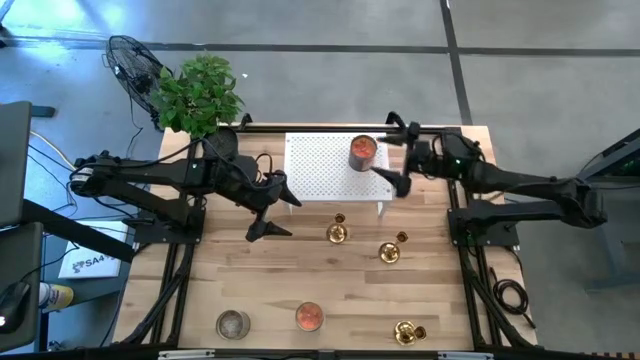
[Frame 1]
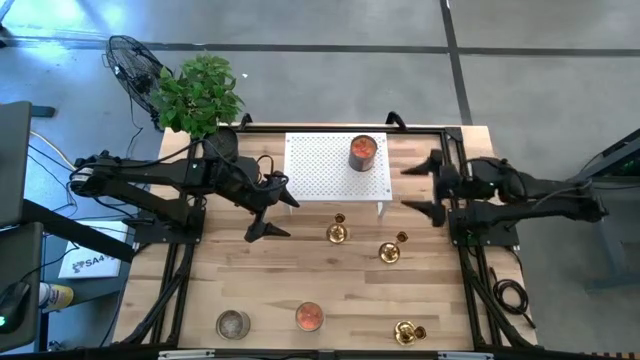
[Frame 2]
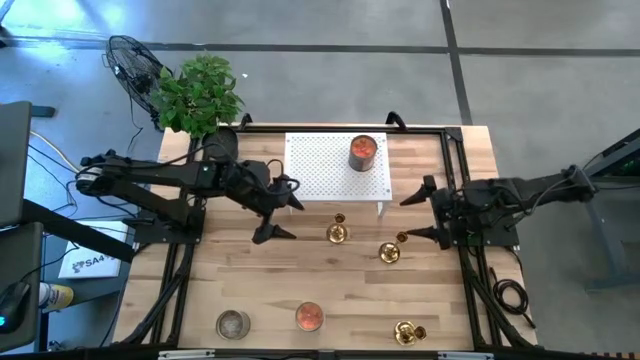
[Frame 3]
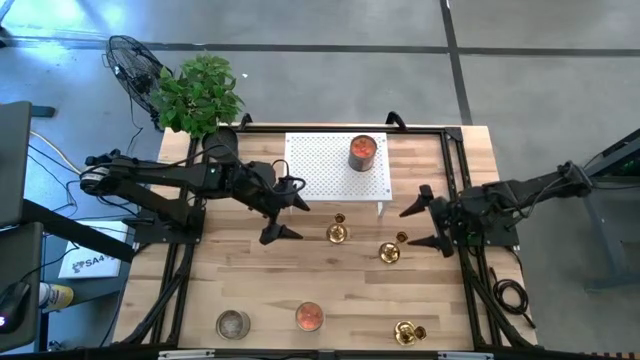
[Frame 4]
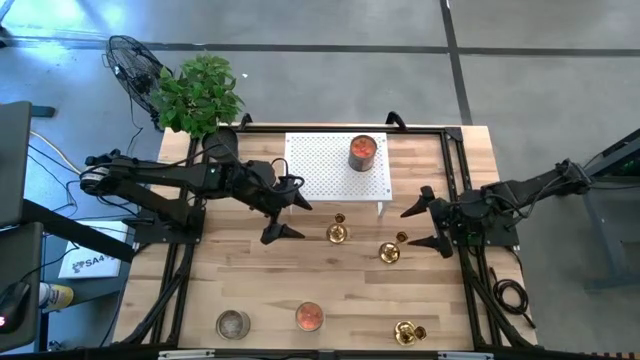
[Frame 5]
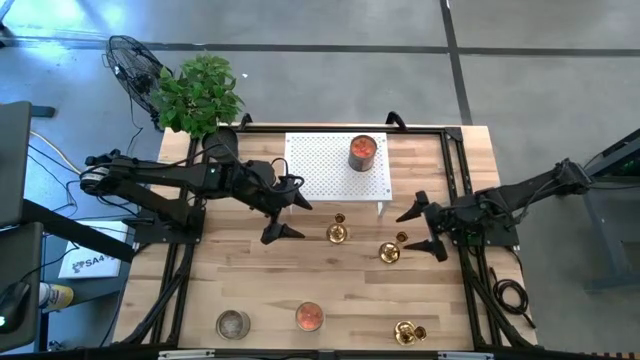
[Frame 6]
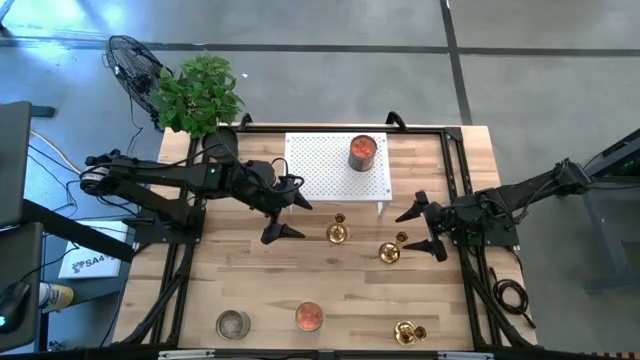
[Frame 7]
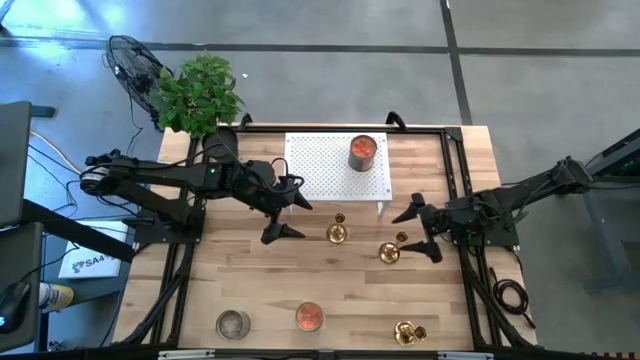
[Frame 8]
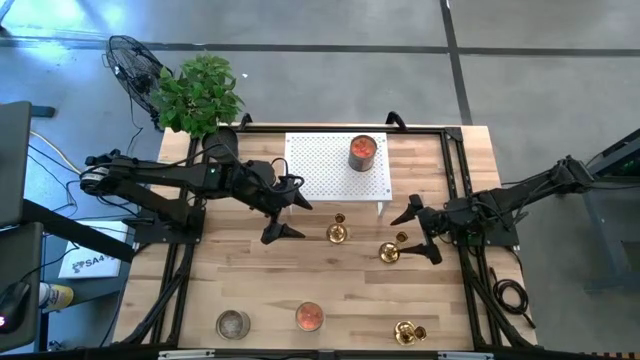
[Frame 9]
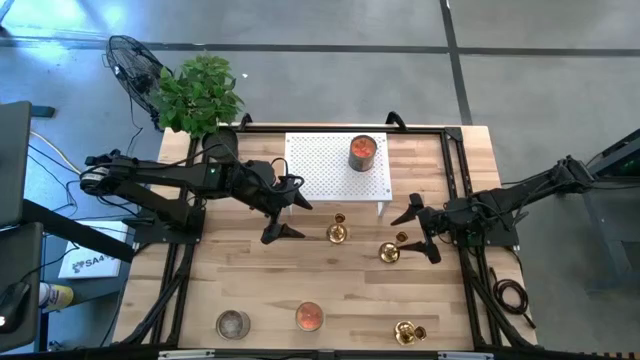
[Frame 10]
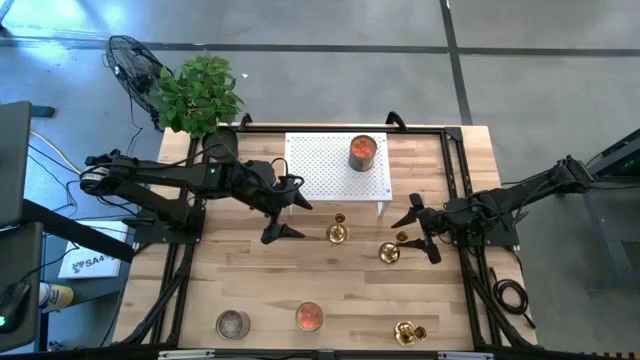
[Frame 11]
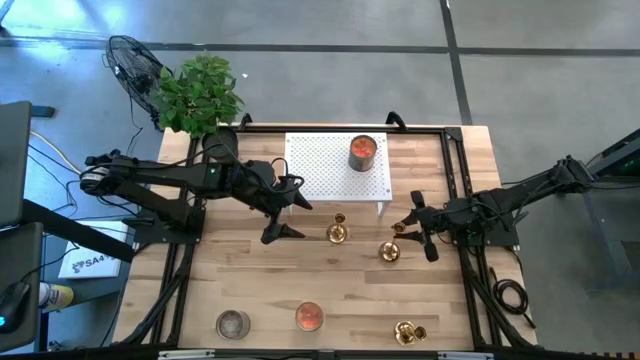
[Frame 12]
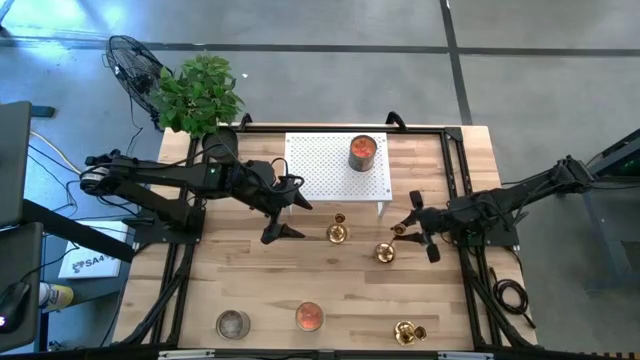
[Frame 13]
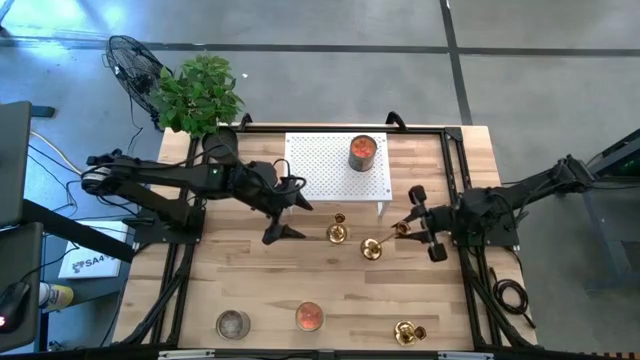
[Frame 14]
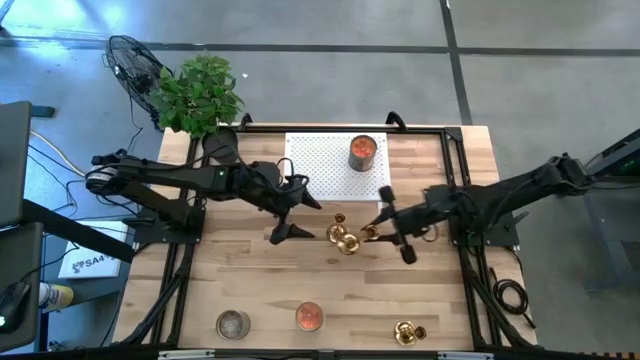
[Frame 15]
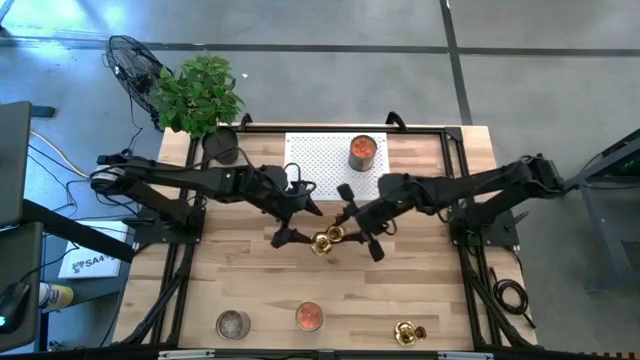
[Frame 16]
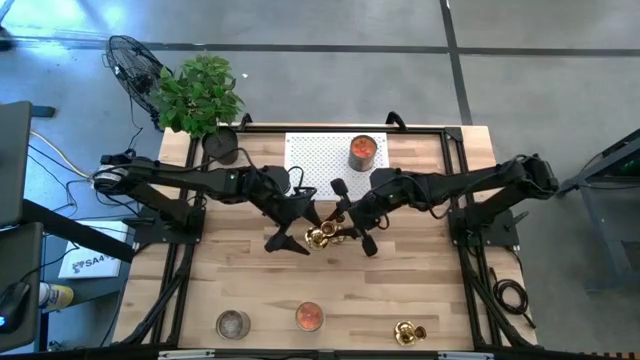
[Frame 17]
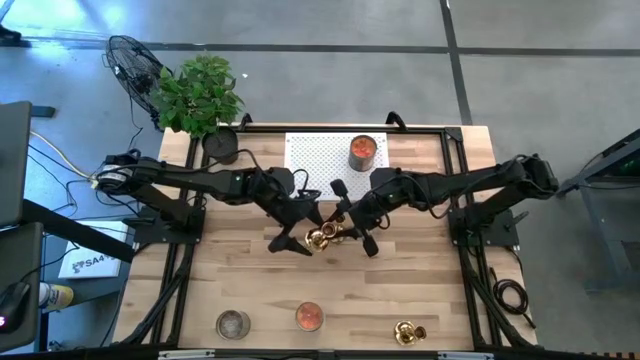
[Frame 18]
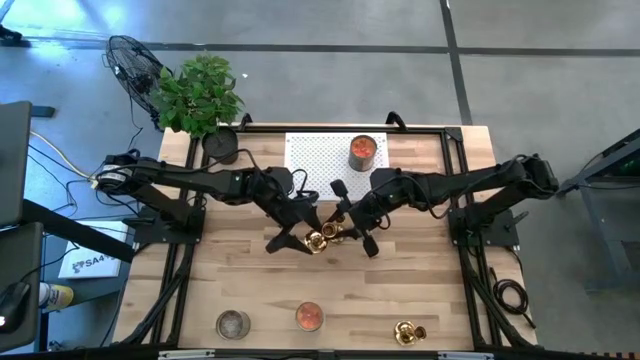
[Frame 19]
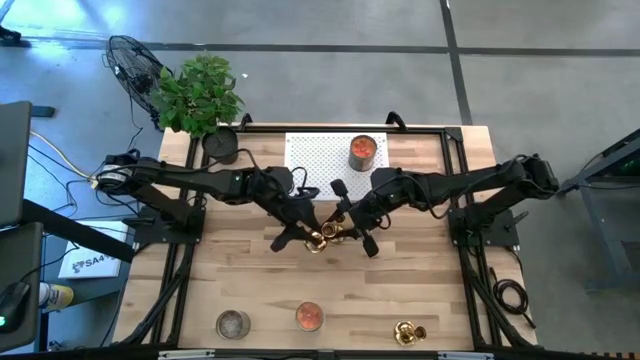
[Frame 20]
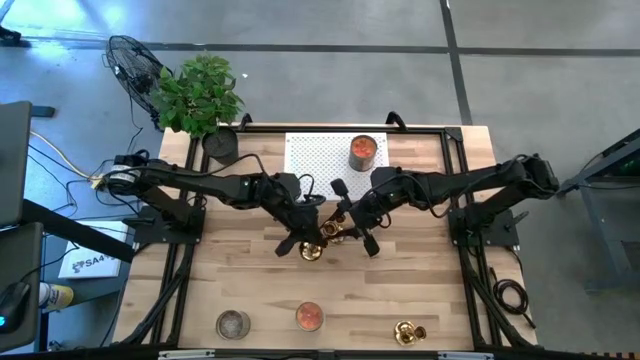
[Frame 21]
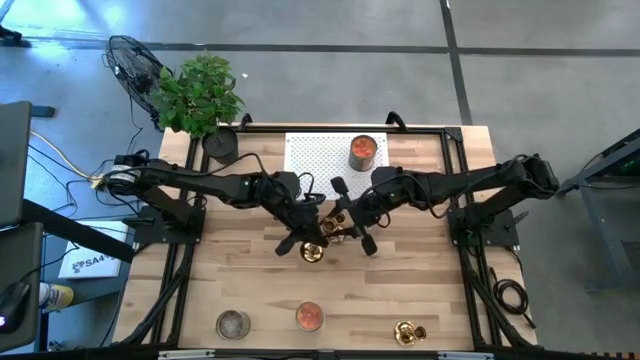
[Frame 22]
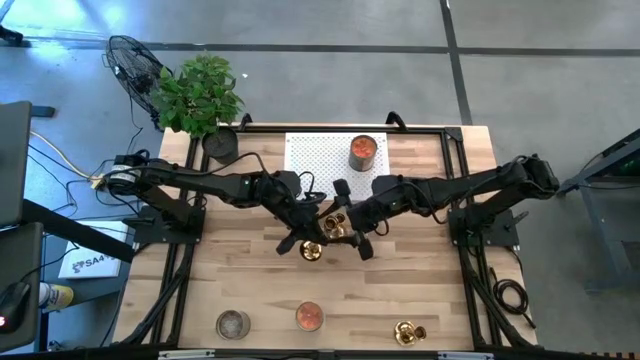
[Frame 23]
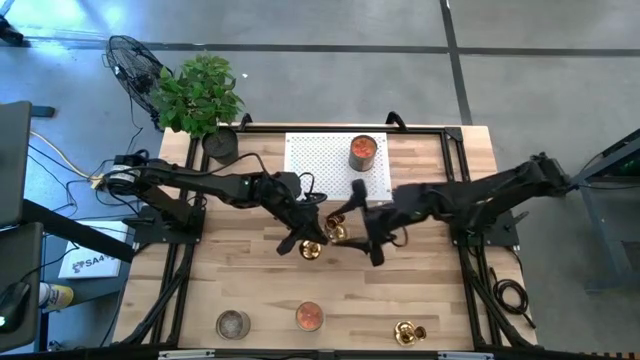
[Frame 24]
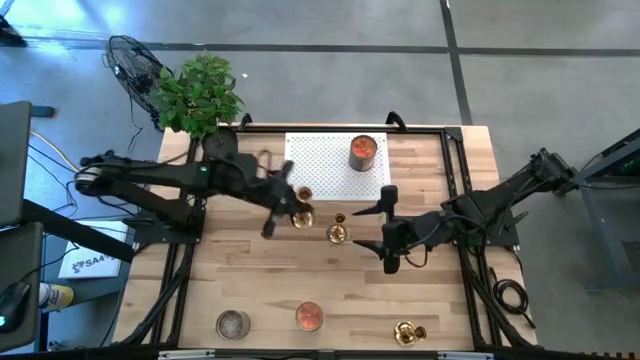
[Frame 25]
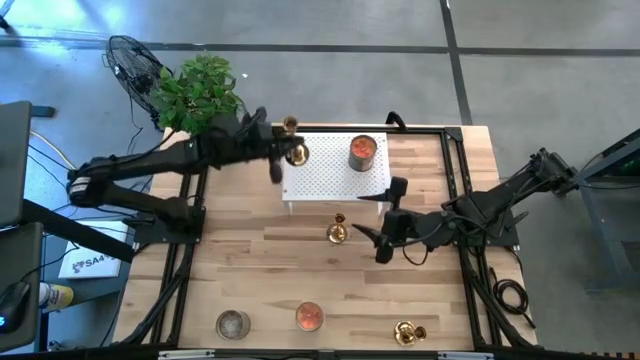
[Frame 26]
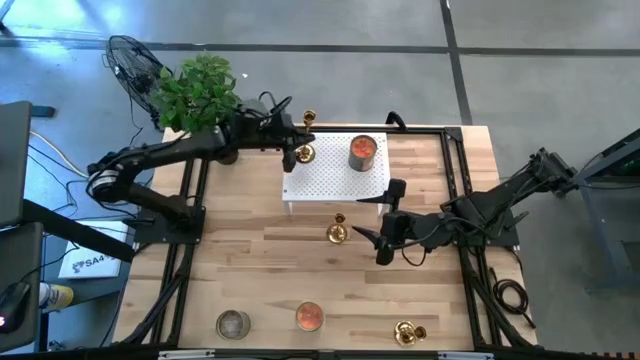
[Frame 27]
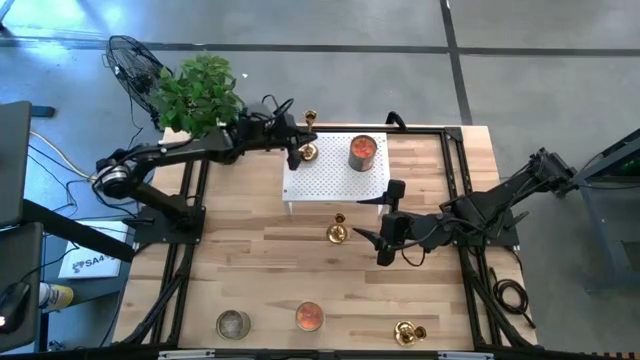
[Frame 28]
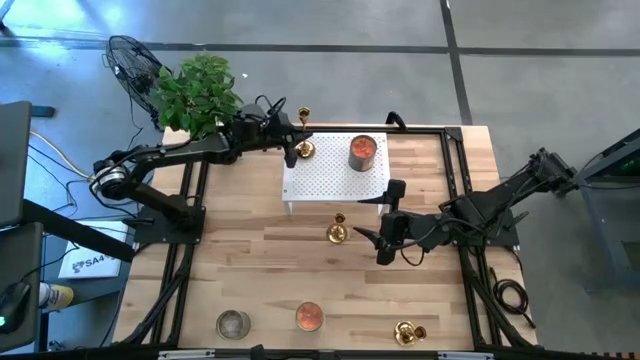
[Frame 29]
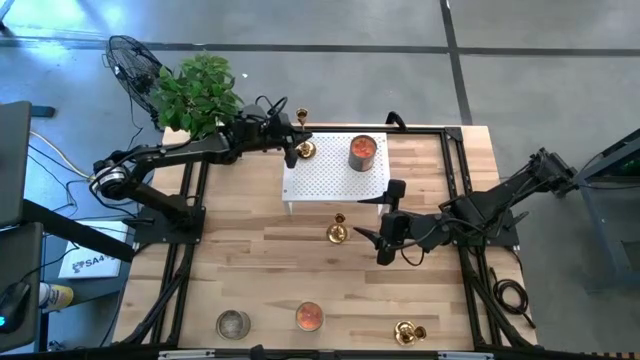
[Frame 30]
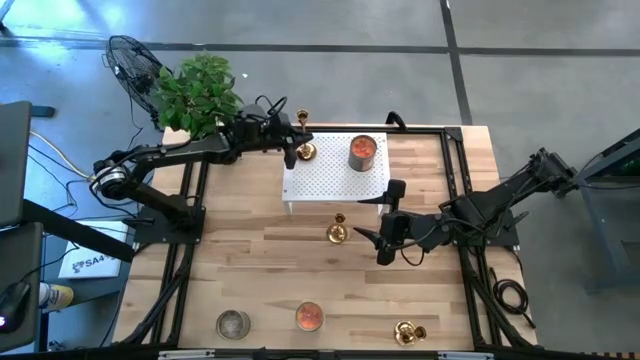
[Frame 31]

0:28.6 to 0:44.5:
Task: Pick & Place candle stick holders
Put the middle right gold holder on the shelf
